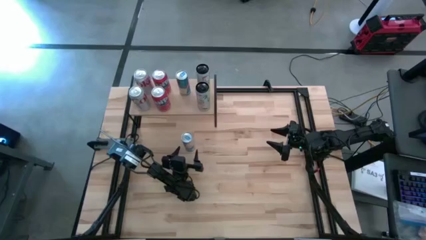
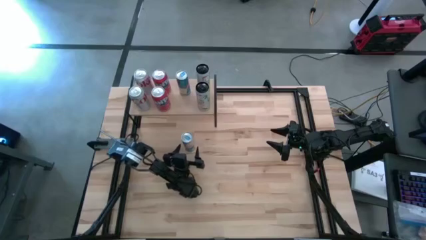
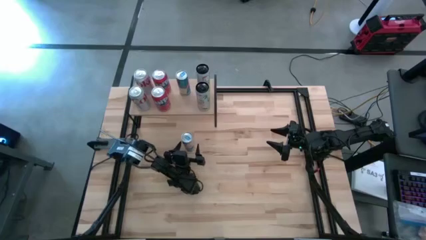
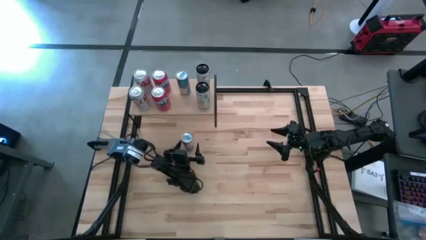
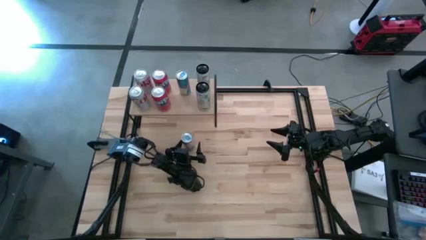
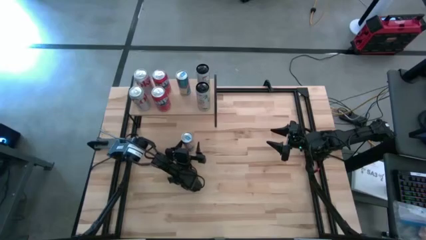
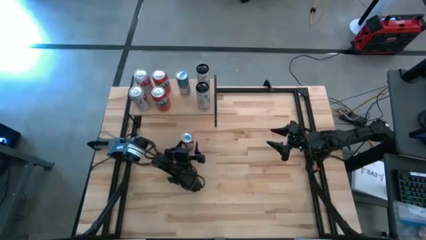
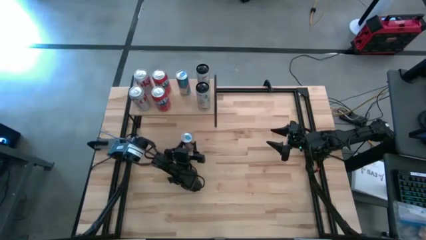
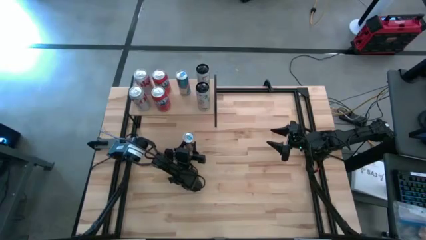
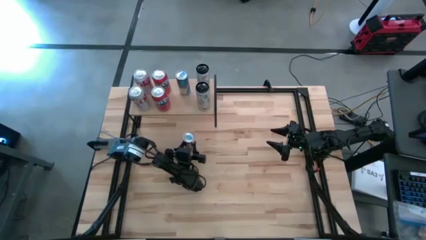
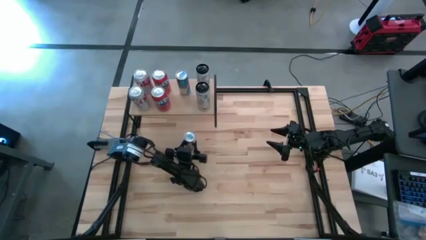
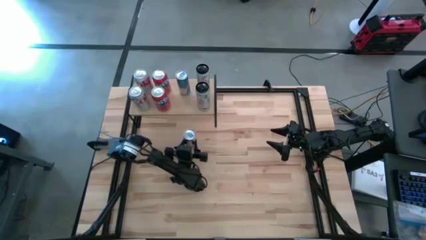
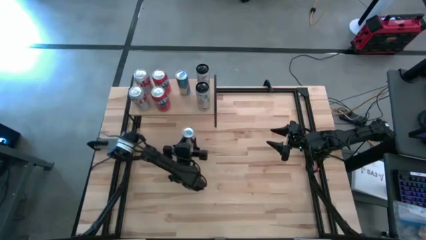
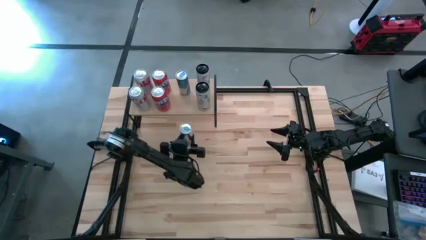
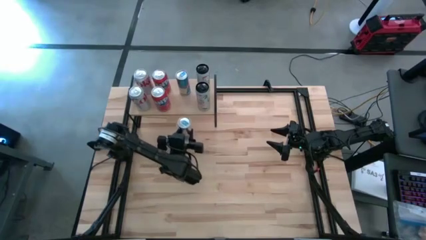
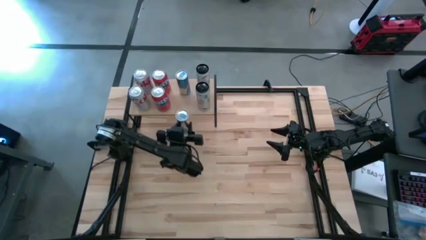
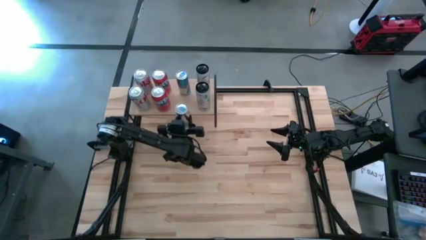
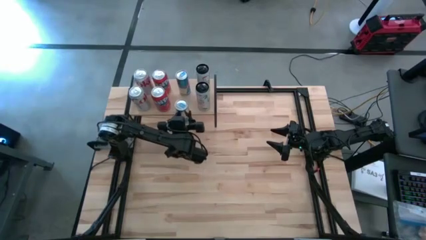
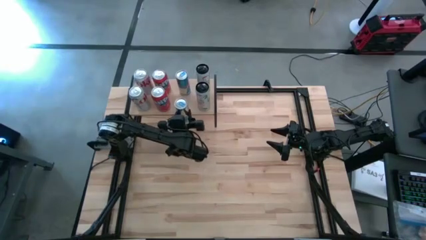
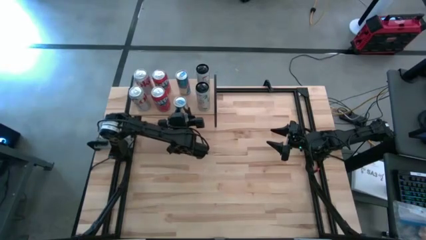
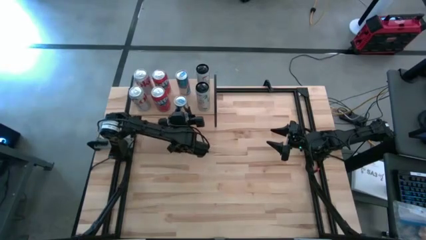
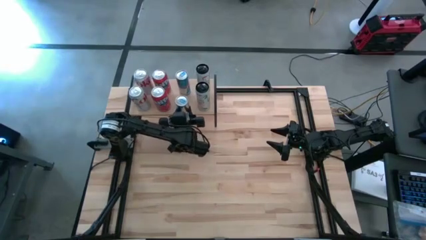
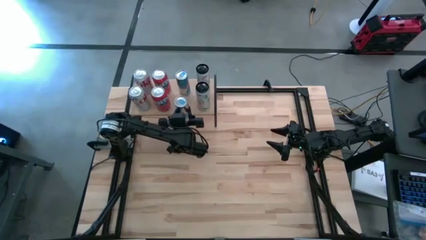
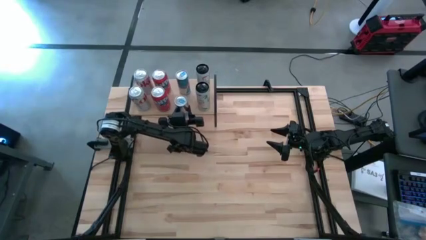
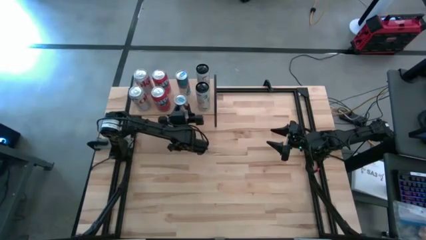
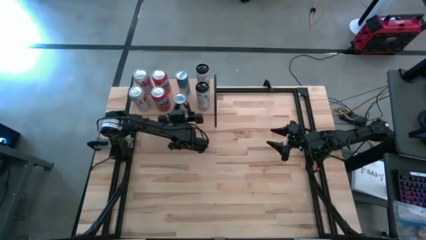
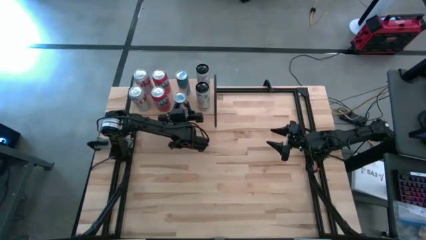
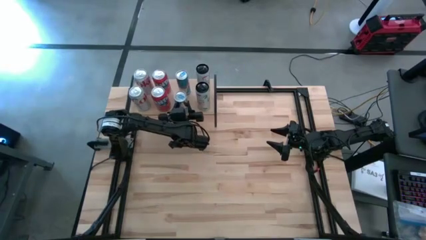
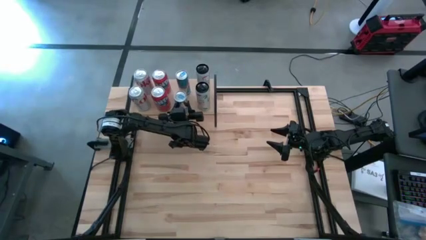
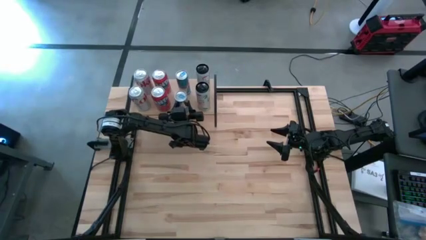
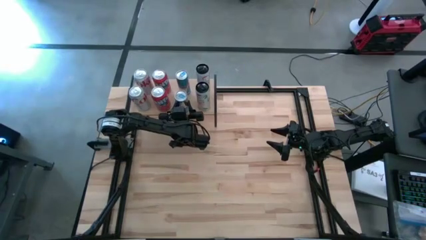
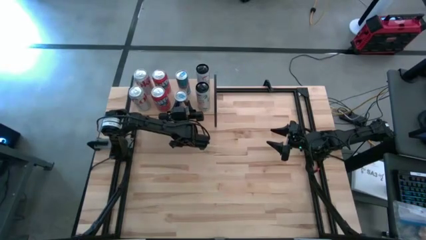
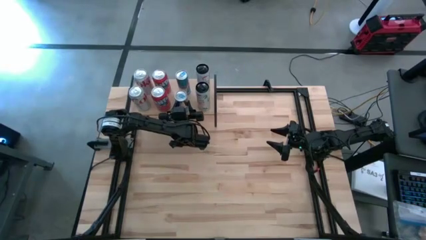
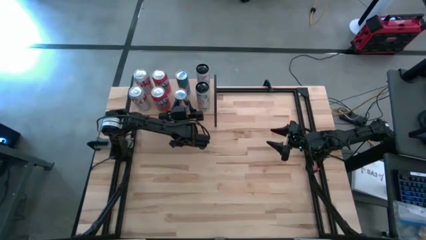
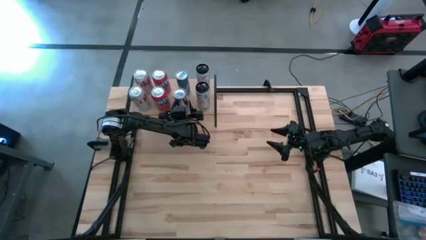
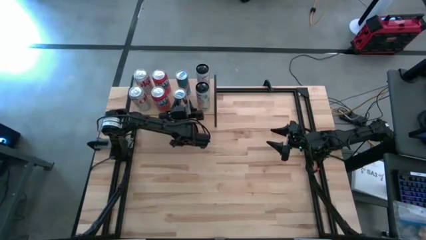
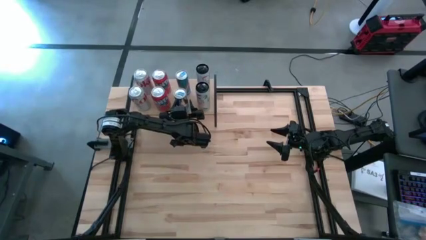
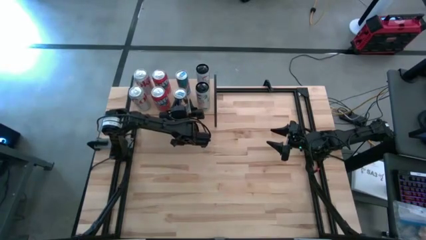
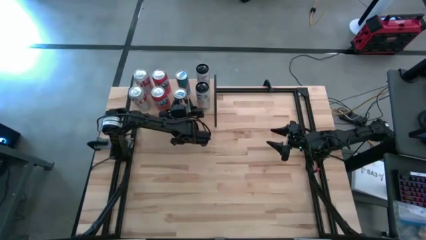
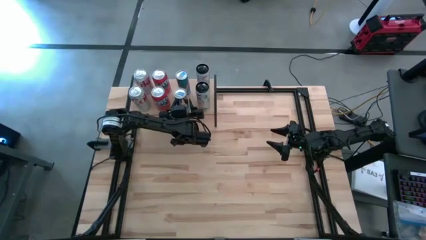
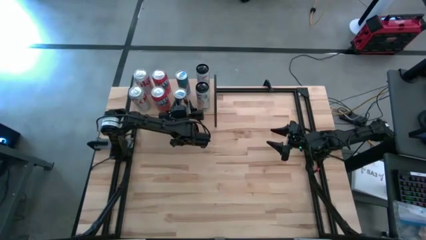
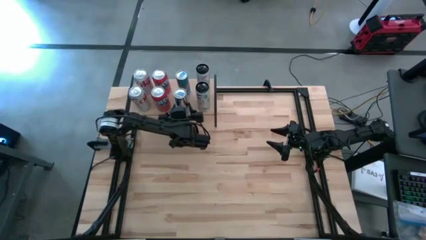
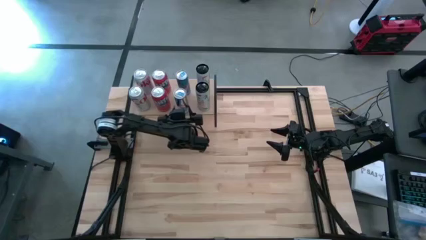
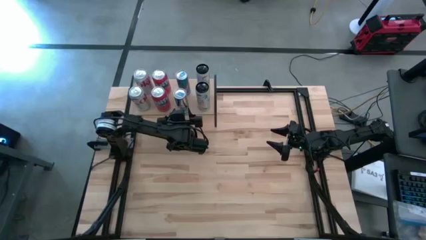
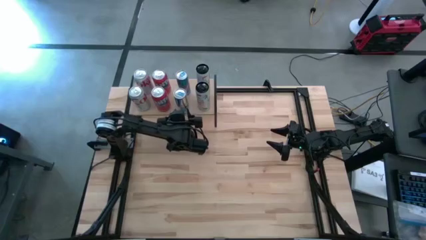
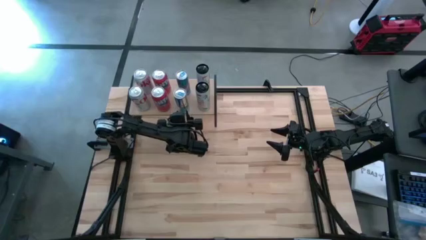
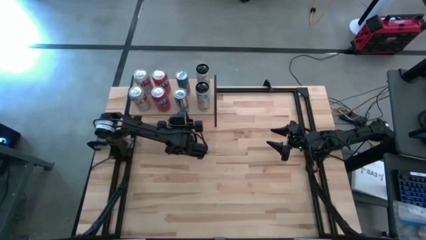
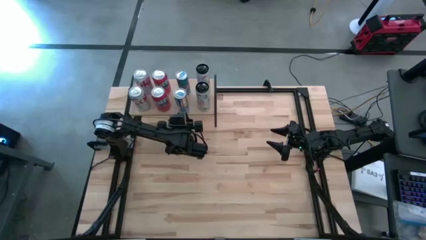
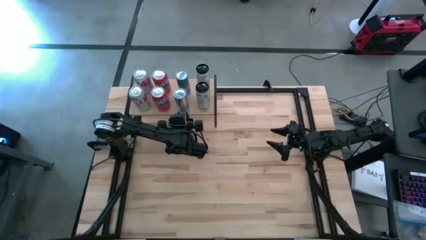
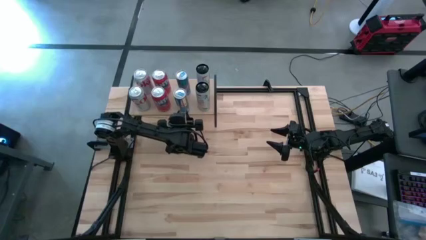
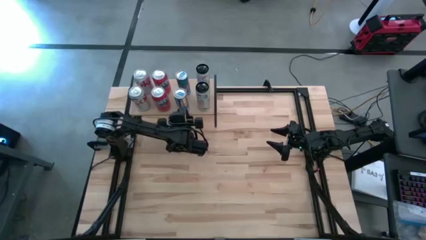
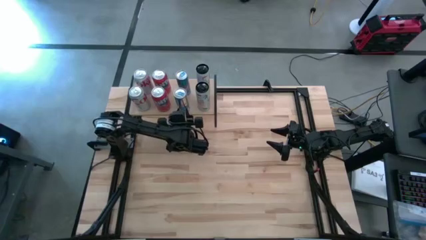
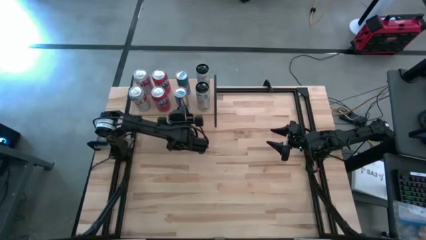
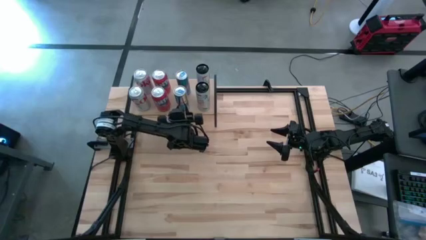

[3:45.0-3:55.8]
Task: Place canned beverage on shelf
Put the blue soda can and align the with the other blue soda can on the shelf

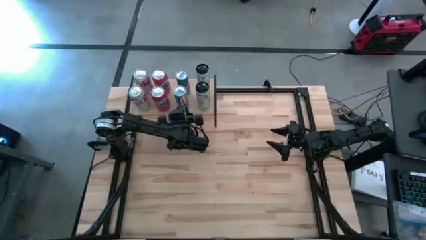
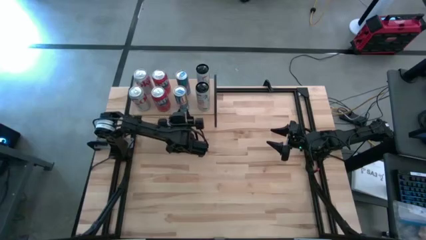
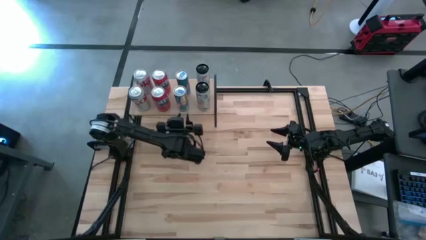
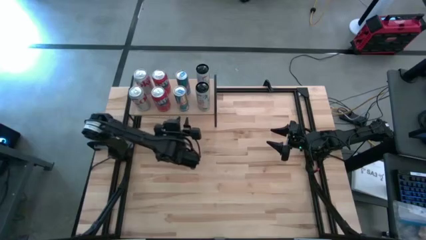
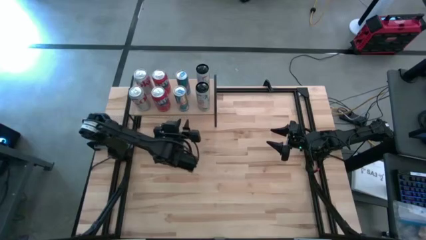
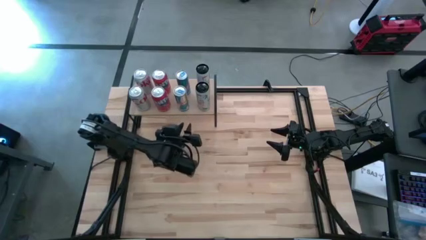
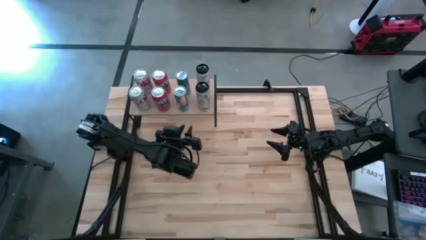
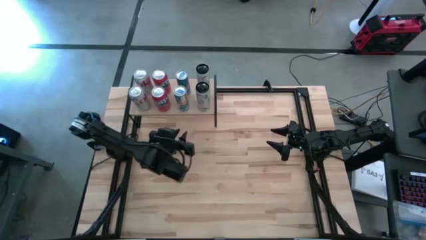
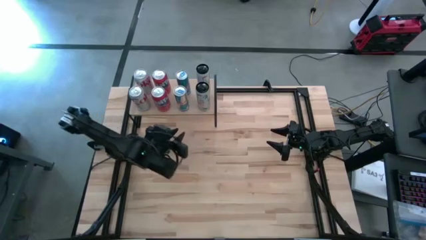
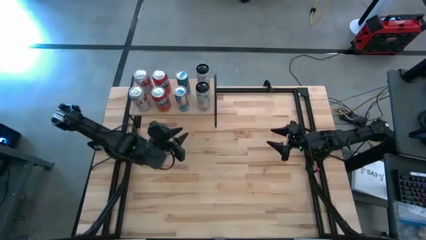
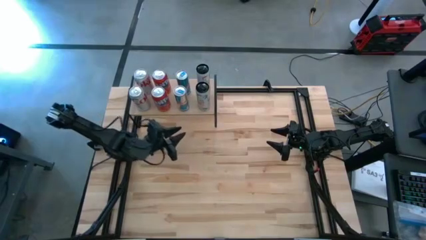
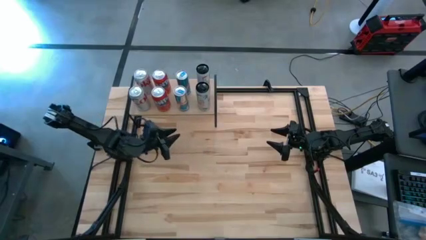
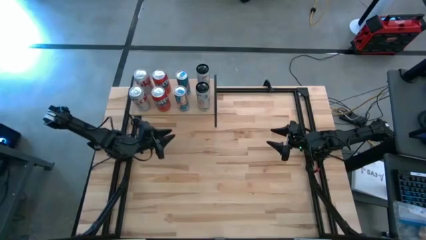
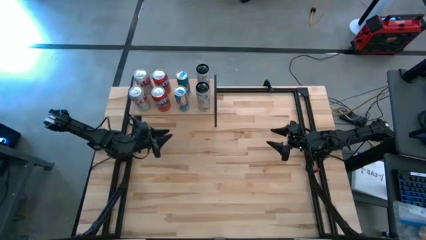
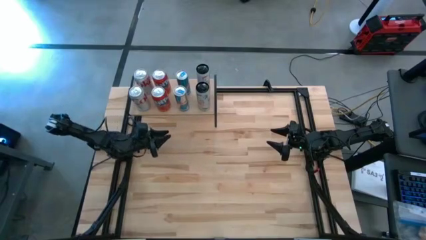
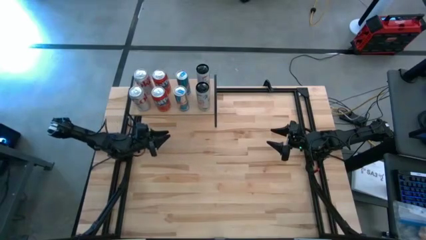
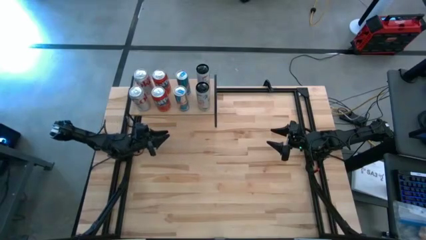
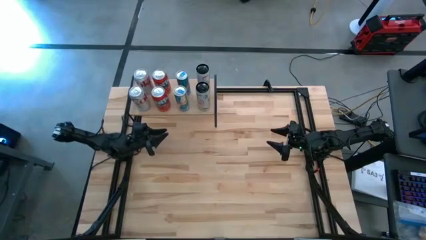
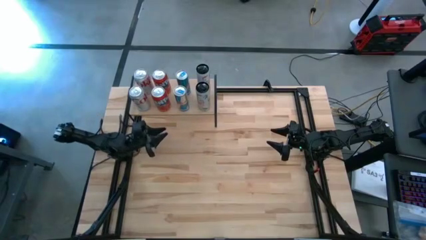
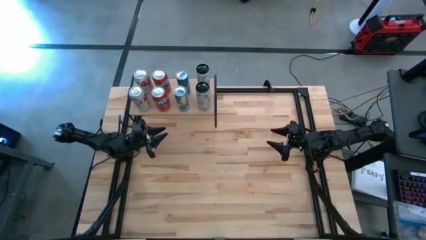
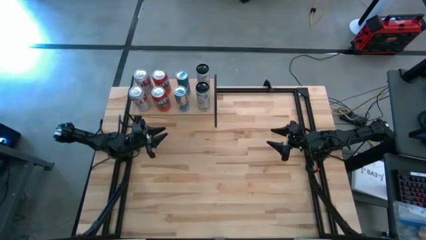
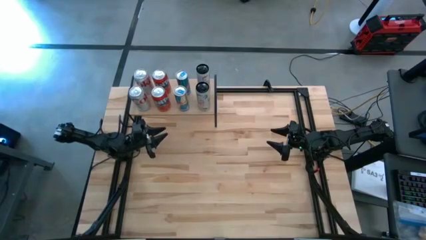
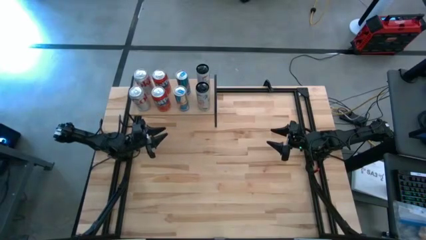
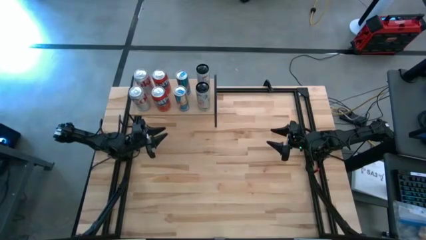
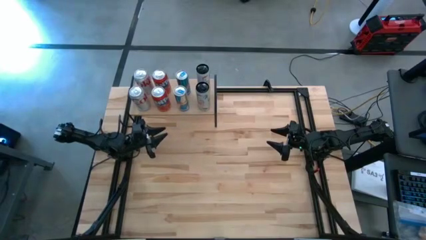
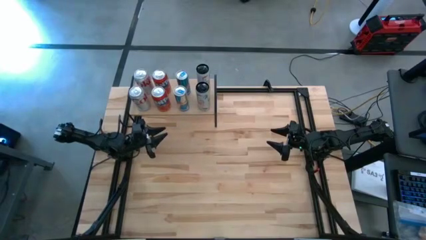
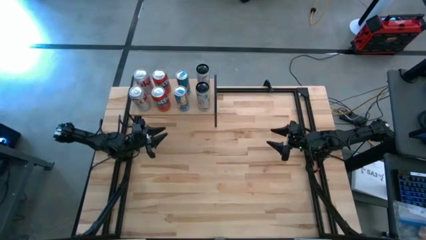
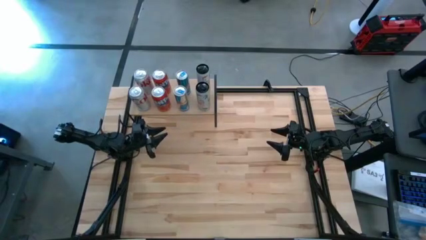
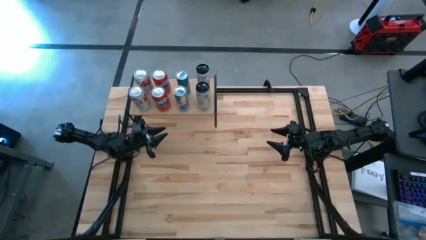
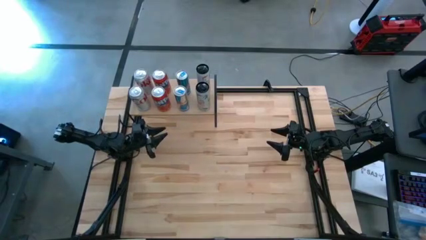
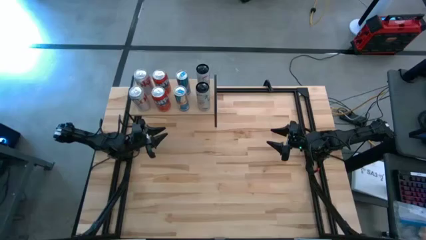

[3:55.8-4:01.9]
Return to Home Position
